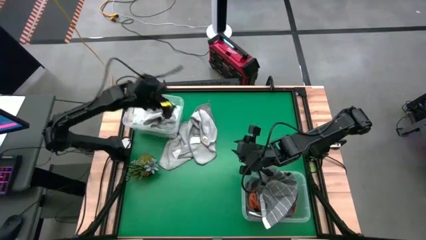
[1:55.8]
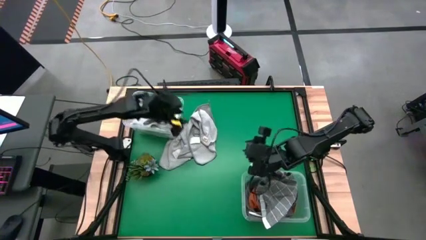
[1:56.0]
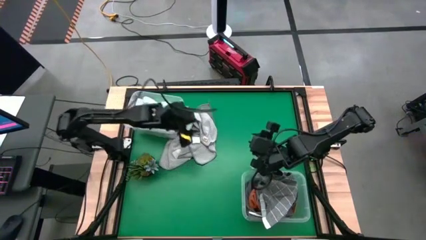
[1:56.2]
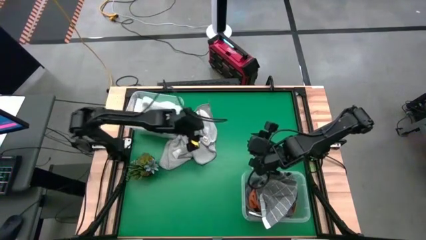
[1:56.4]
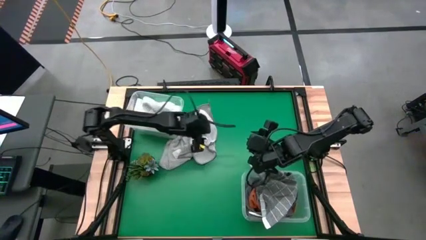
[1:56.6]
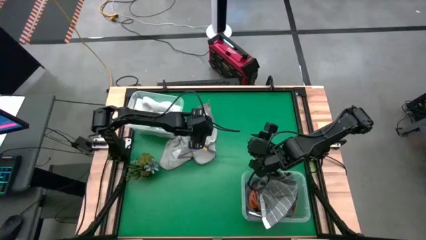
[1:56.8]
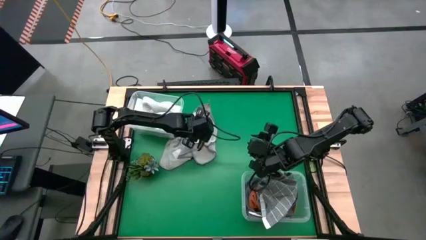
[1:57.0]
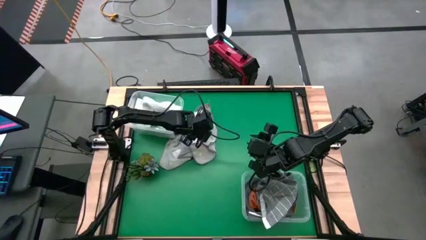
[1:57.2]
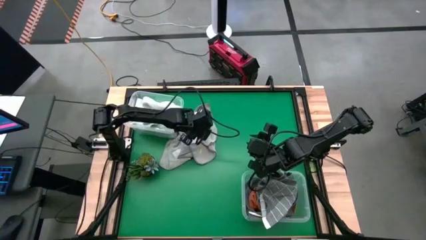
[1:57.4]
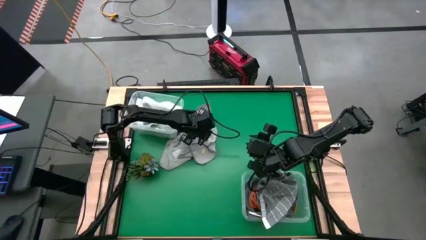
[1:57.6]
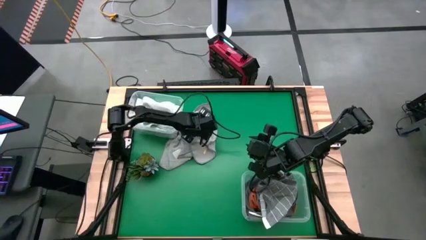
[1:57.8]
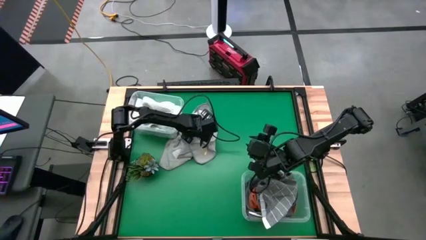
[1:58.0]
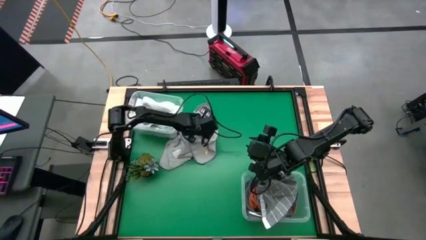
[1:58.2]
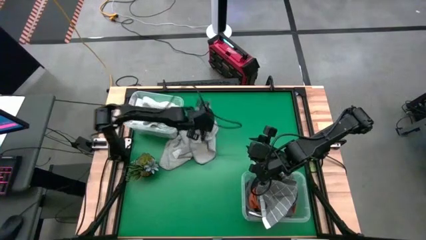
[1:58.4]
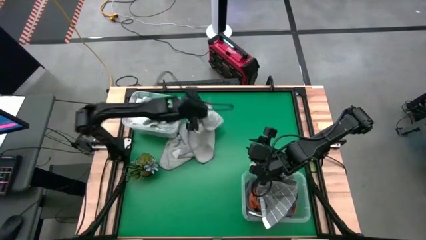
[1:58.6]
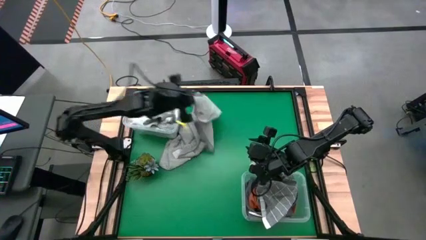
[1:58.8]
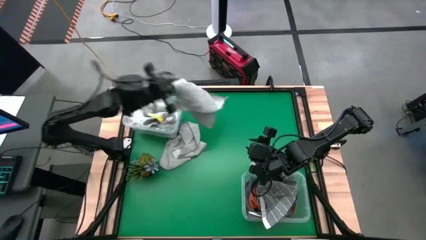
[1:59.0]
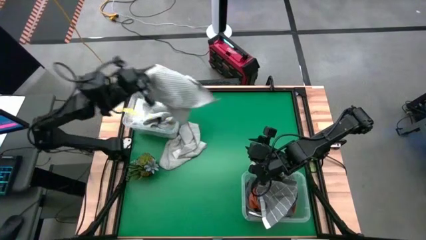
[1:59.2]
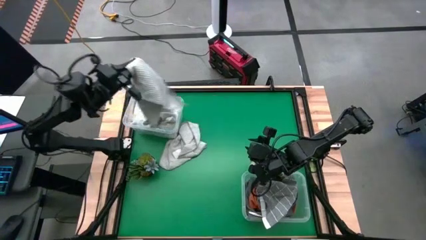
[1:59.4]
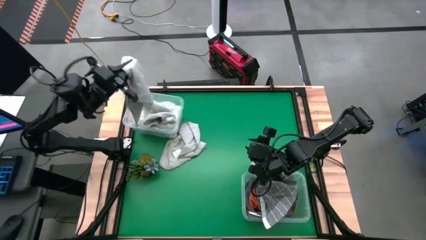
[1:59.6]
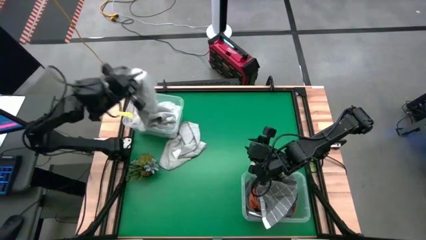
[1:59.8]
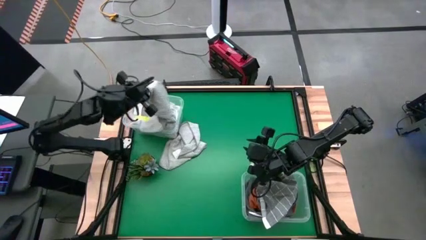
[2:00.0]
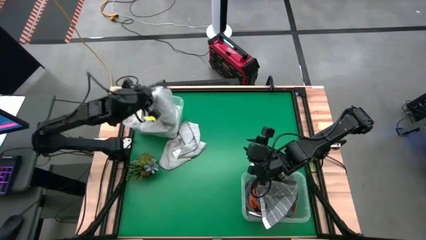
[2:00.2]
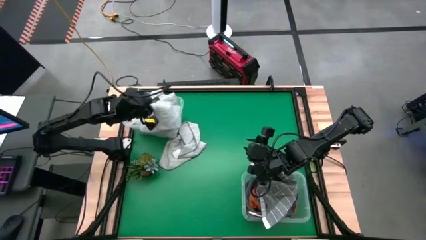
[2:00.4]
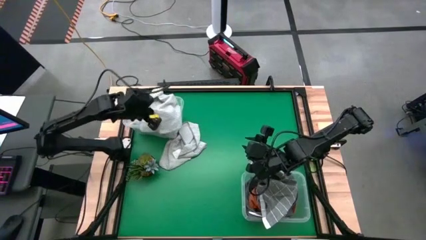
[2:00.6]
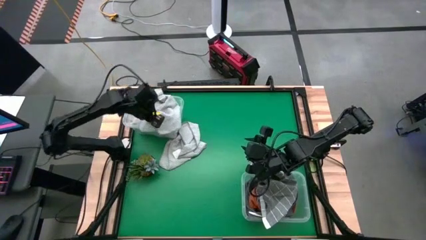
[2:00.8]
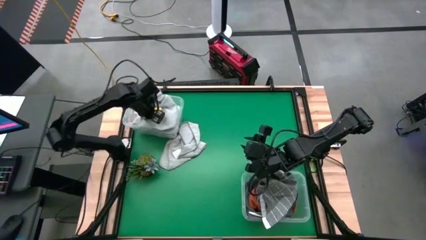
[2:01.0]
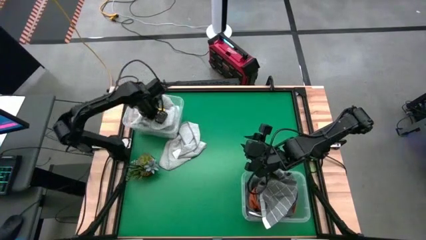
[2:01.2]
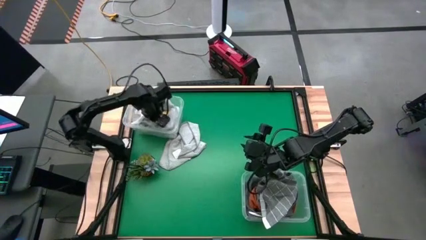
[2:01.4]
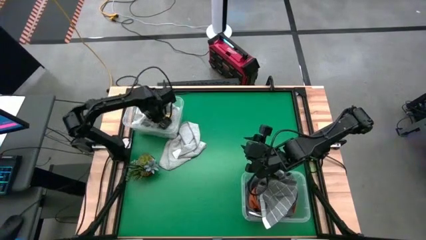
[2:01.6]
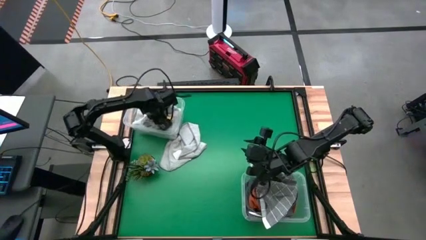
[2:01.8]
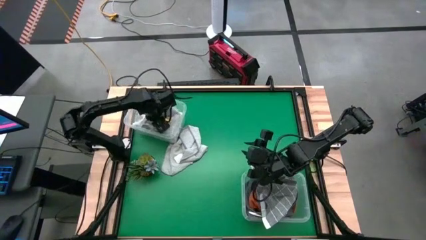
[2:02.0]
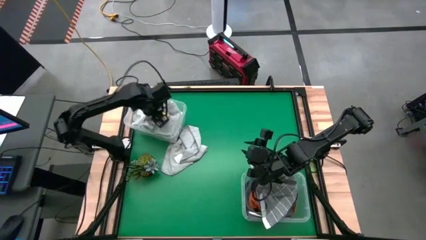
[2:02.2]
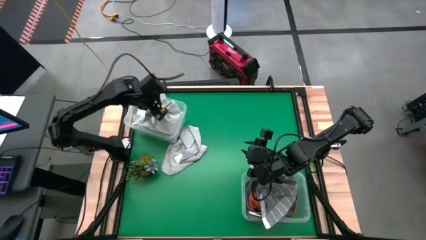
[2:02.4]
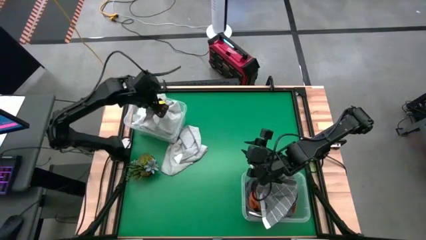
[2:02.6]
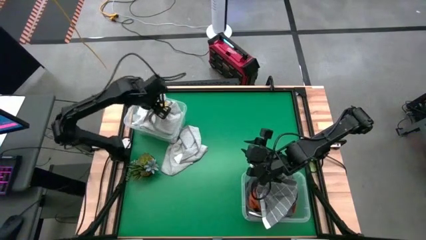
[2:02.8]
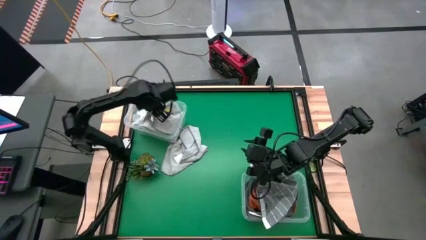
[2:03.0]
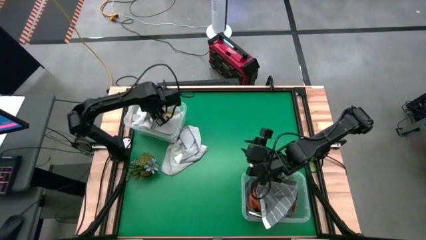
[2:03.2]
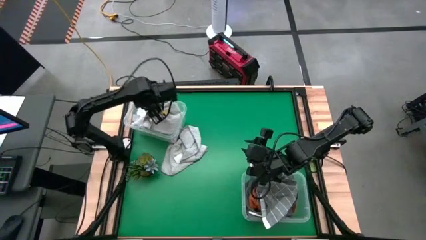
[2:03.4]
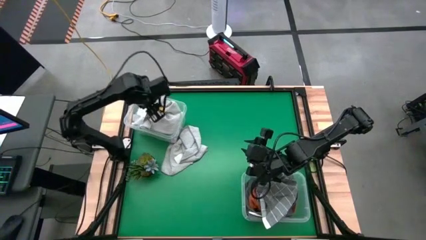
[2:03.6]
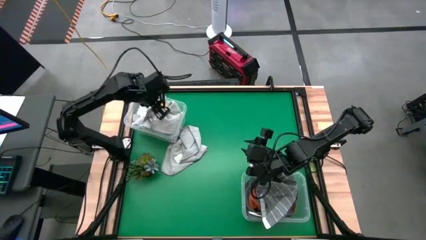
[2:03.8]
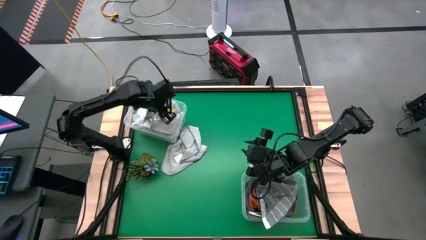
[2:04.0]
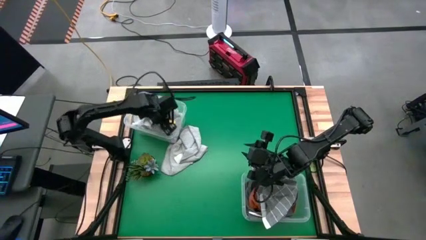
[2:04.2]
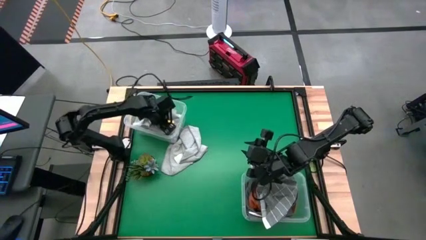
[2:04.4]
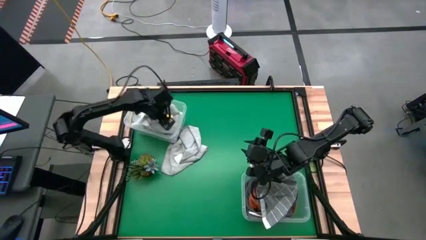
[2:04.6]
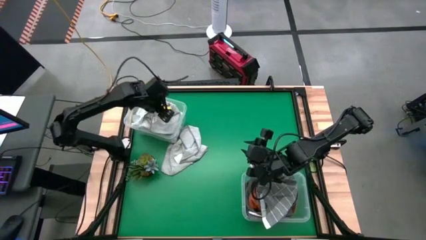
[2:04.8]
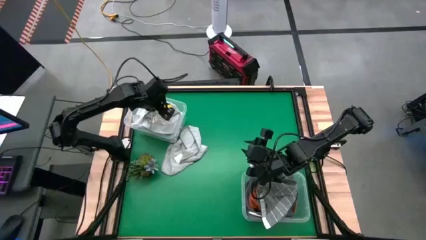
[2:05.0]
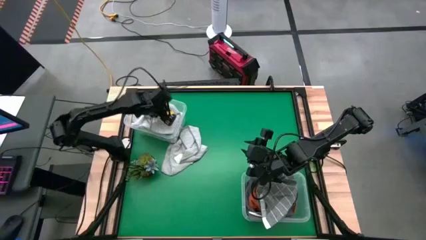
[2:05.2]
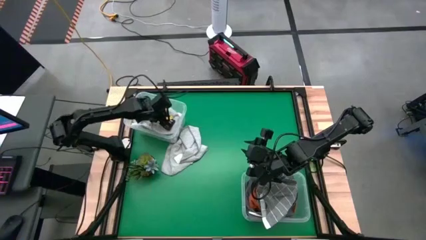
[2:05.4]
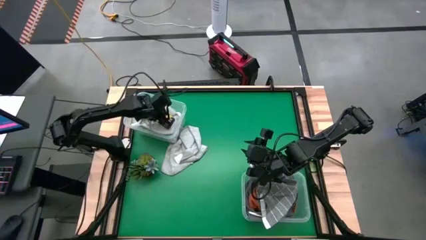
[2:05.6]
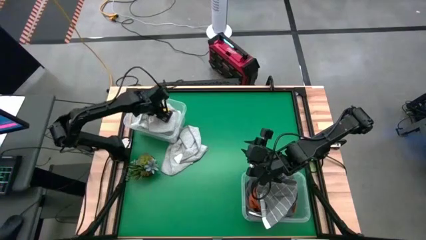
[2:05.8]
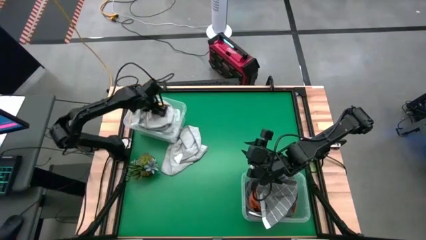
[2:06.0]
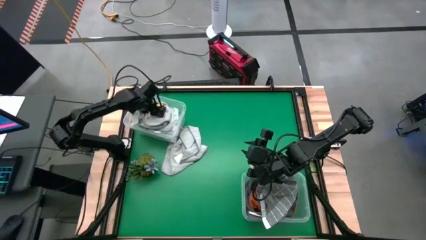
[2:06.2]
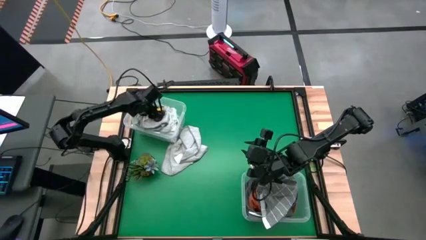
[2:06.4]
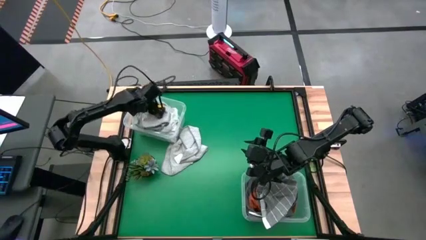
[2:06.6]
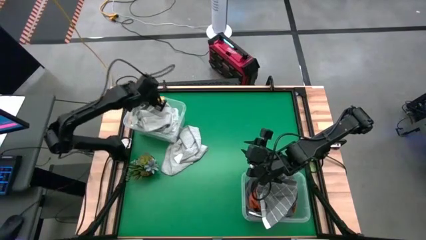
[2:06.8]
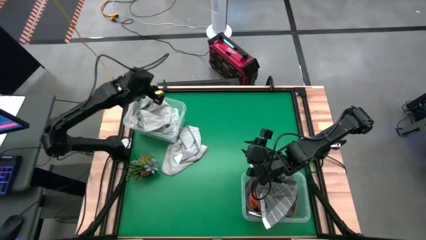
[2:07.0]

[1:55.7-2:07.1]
Task: Sort towels by color in basket
Put the light gray towel into the top transparent bin

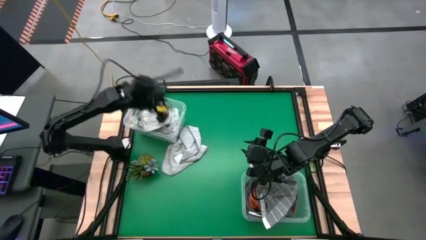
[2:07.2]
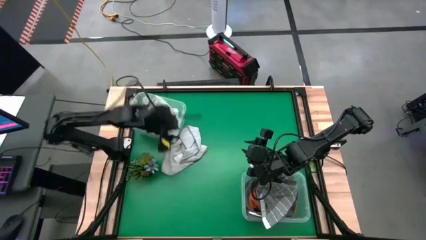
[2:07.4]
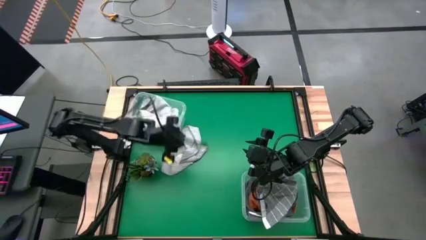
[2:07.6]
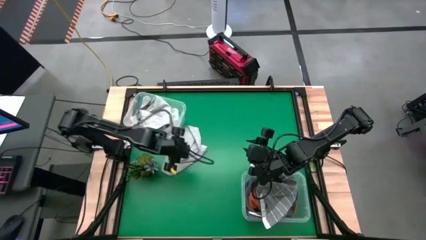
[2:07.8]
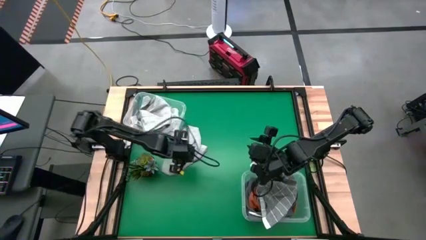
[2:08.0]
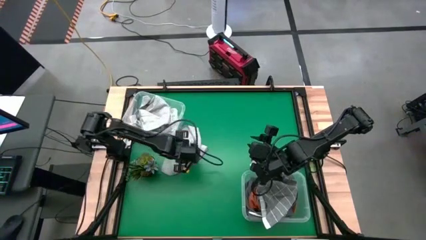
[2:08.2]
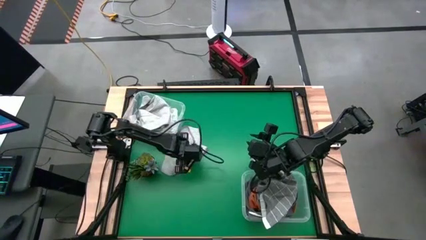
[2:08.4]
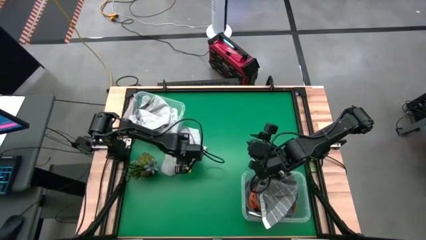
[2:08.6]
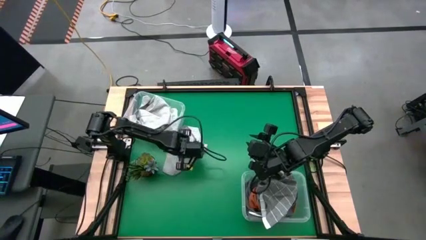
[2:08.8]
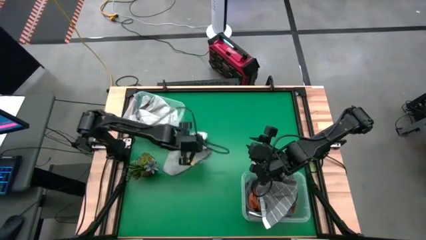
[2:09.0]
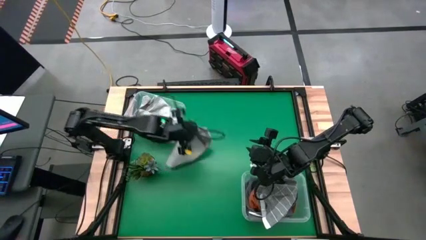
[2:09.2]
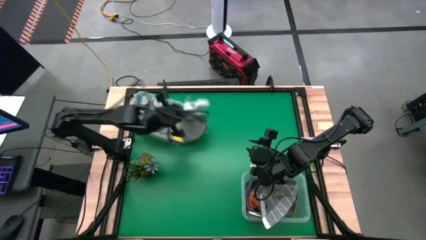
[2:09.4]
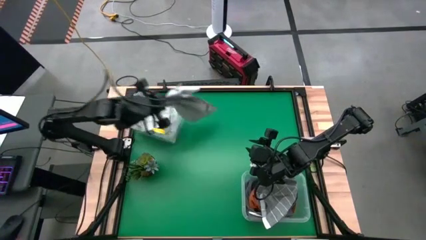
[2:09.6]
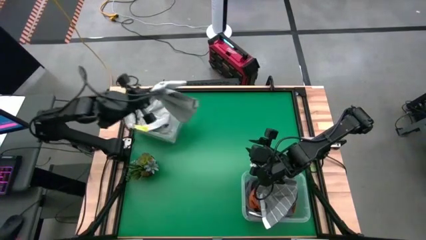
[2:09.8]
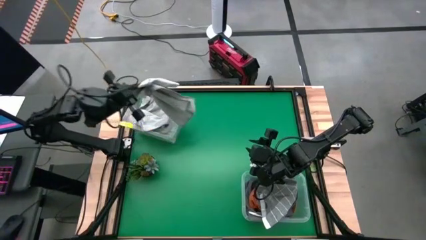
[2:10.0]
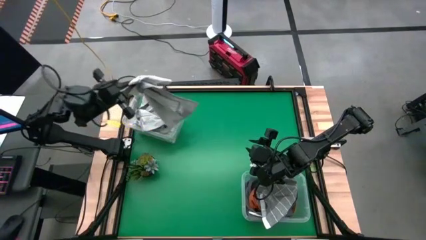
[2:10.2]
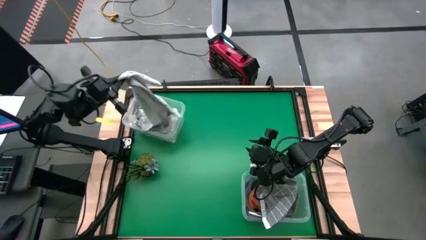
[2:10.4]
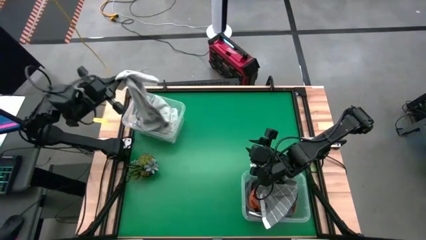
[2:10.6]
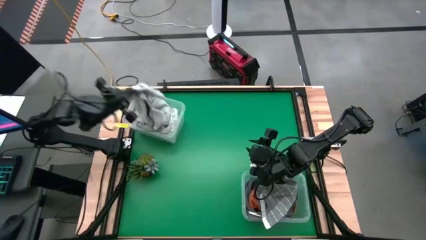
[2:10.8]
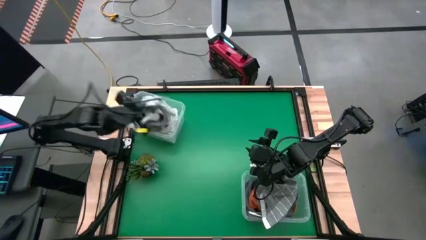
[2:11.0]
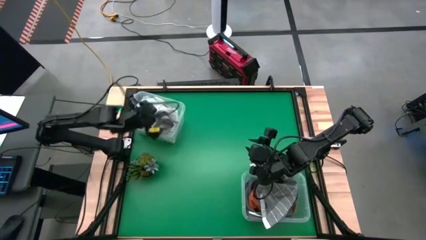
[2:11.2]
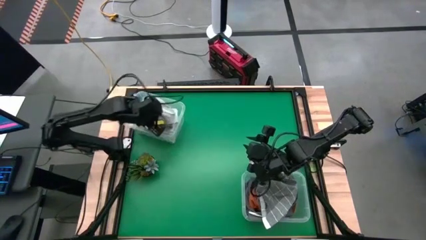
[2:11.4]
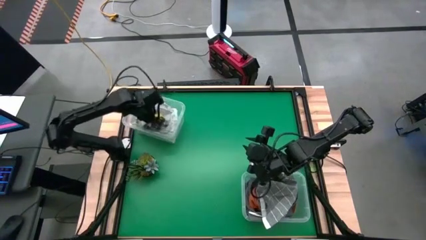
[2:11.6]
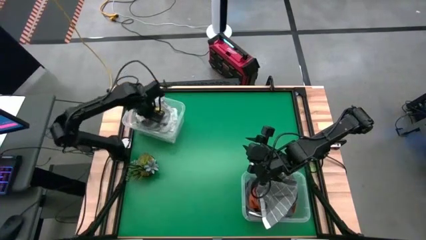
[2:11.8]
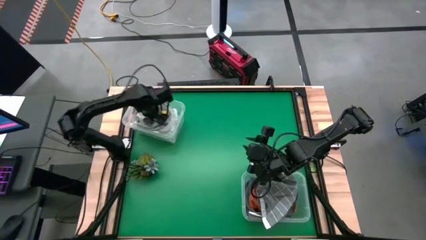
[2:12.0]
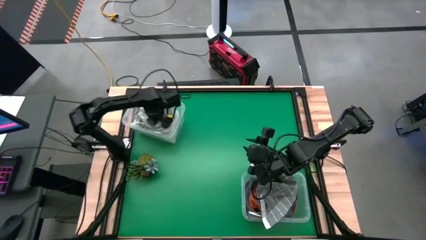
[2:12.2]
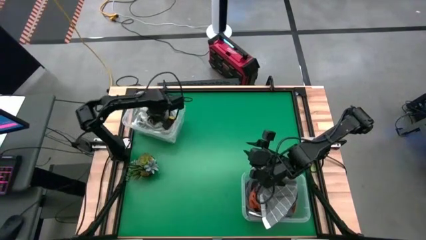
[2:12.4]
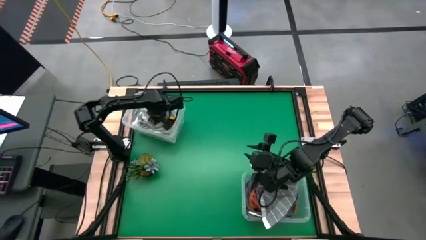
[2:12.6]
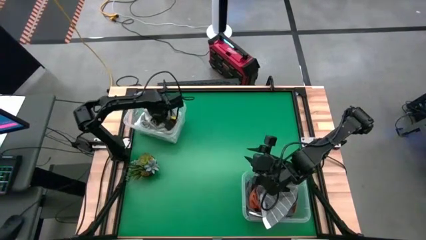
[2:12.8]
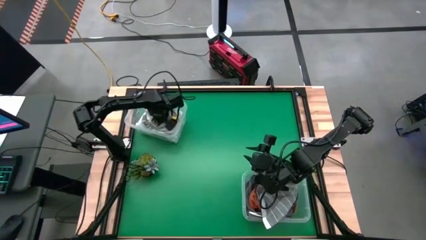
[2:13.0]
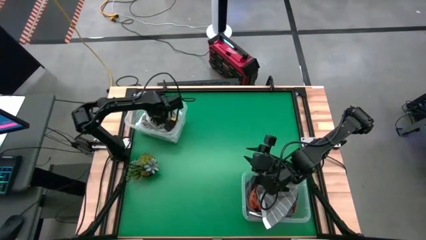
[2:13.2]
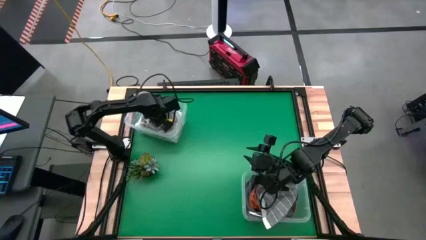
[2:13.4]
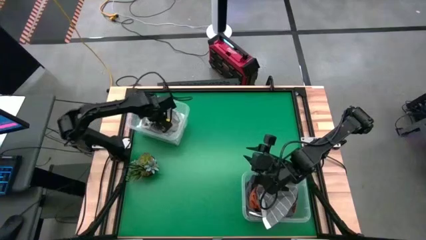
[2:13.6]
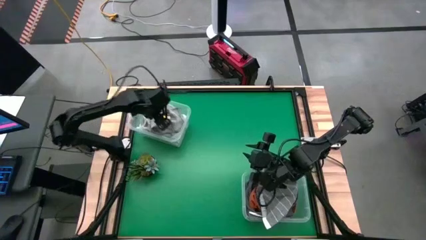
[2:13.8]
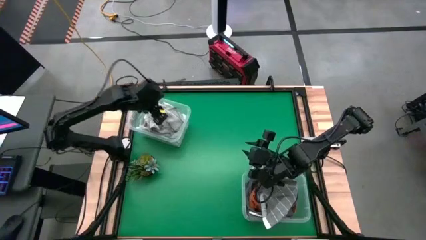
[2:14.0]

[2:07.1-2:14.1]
Put the light gray towel into the top transparent bin
